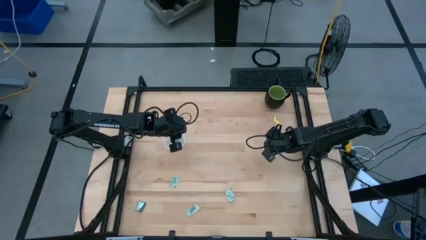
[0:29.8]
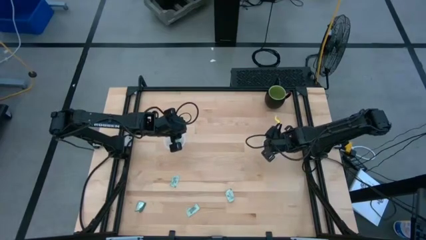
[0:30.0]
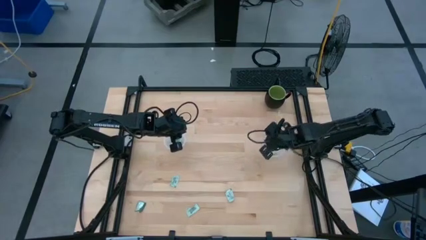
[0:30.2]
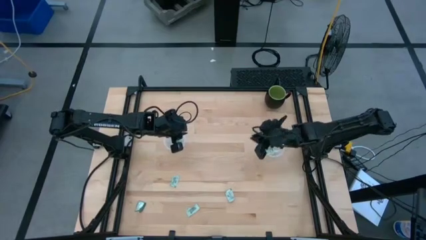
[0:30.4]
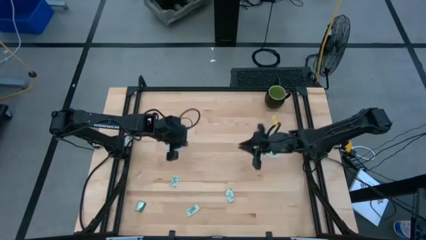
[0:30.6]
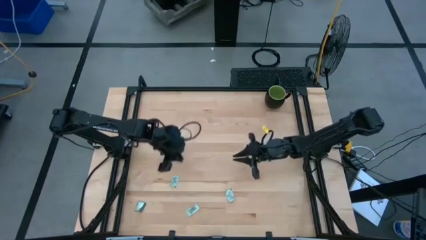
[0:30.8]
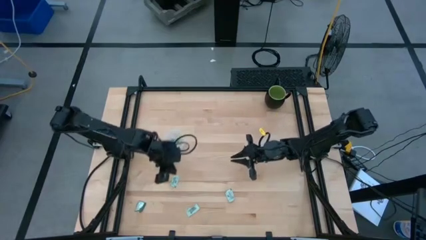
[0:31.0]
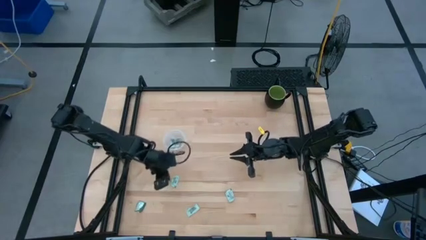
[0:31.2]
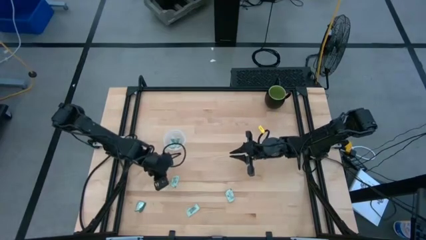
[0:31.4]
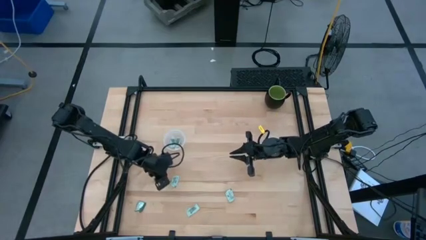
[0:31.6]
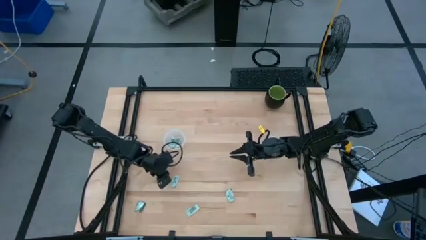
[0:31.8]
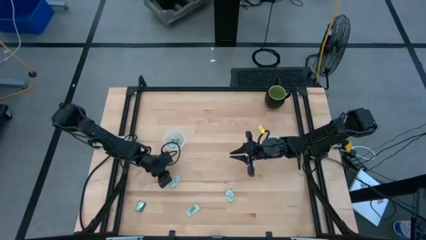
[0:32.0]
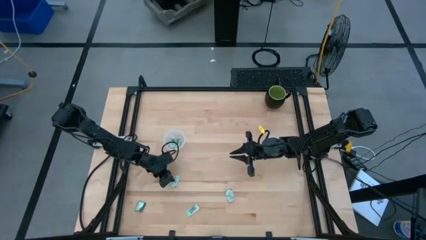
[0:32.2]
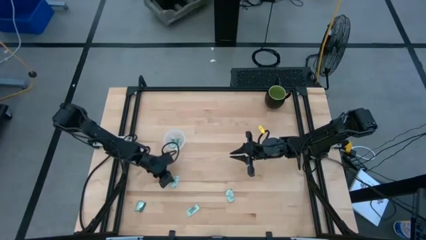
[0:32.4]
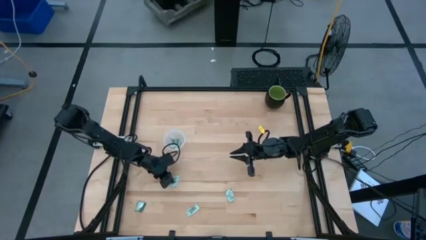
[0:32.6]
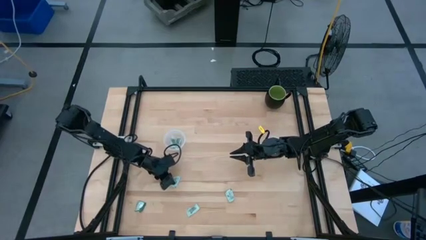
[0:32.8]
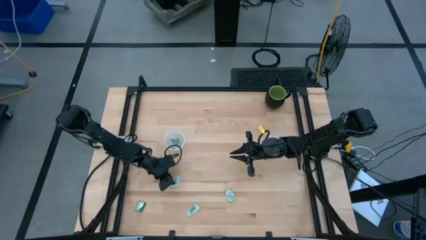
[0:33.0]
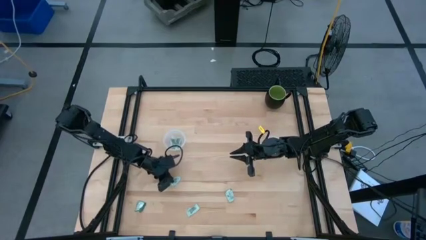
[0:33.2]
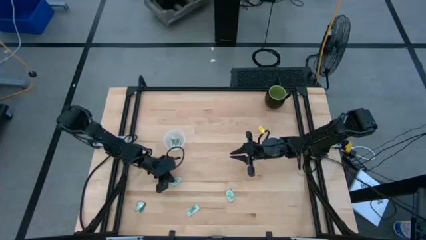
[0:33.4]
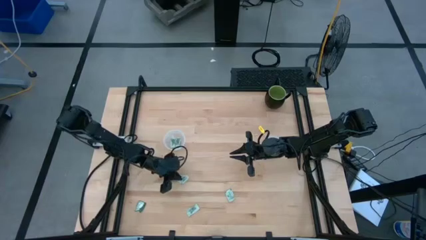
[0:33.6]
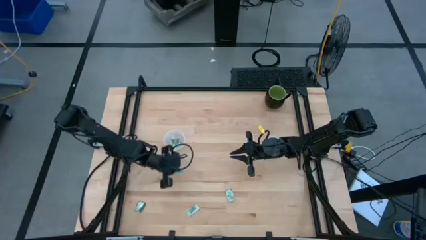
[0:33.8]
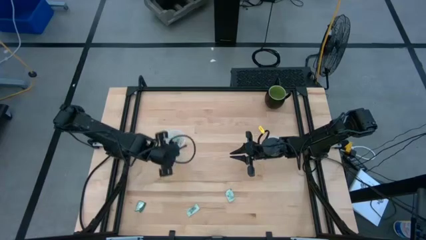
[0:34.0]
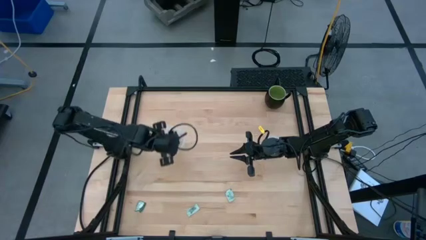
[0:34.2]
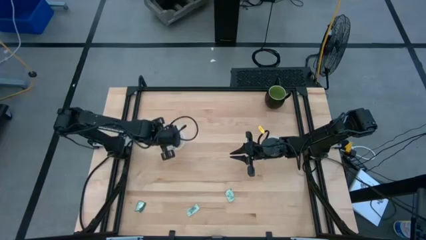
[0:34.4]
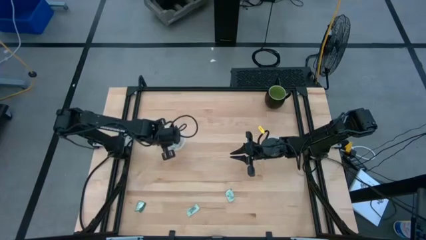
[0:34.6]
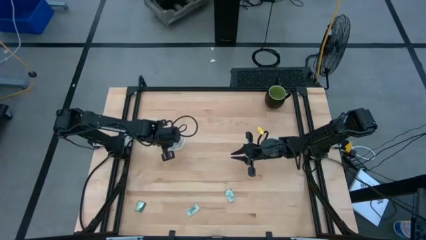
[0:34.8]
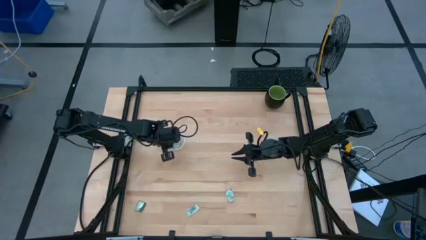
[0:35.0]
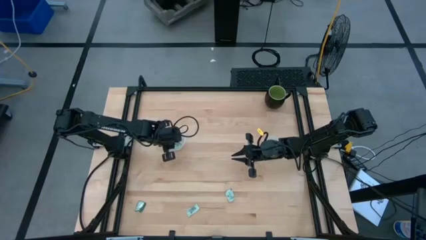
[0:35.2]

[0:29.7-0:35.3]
Task: Pick and place items into bin
Put the stevia packet into the left transparent bin

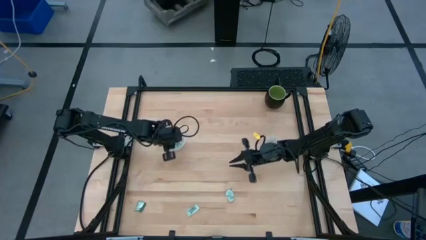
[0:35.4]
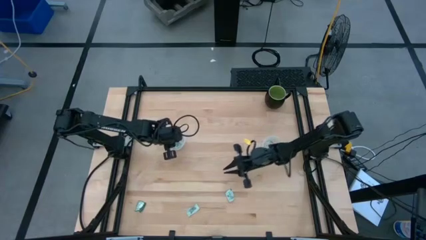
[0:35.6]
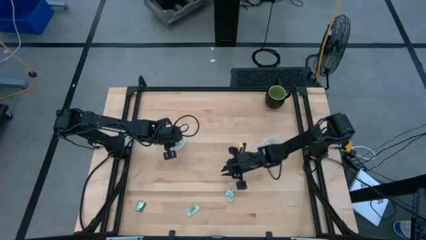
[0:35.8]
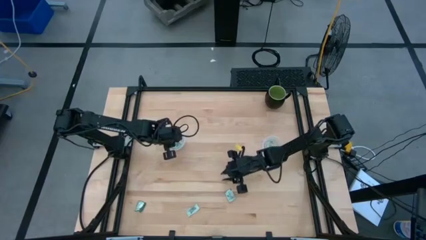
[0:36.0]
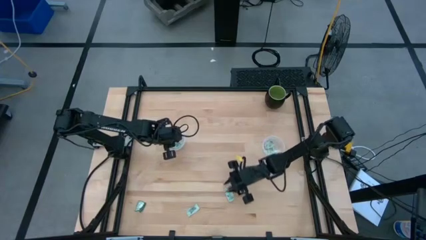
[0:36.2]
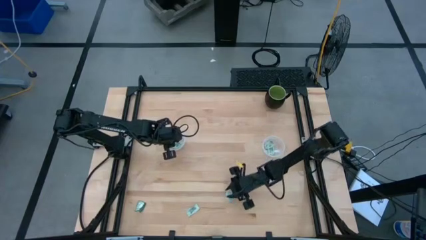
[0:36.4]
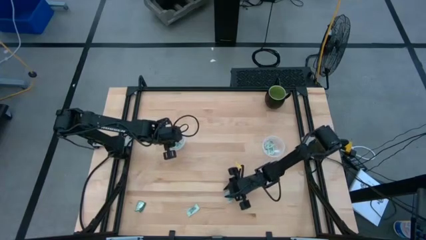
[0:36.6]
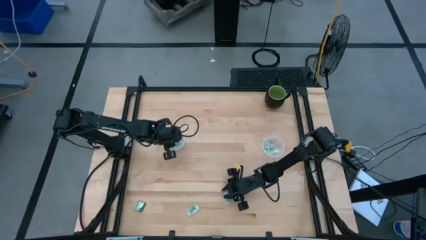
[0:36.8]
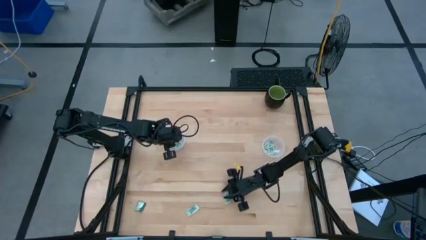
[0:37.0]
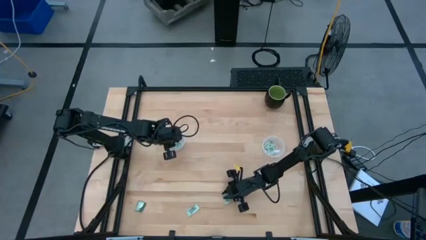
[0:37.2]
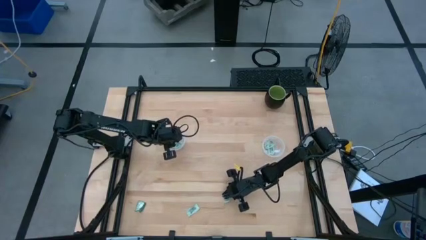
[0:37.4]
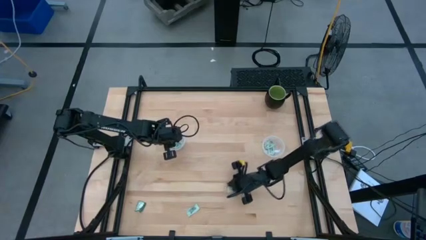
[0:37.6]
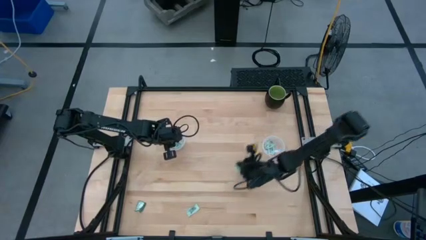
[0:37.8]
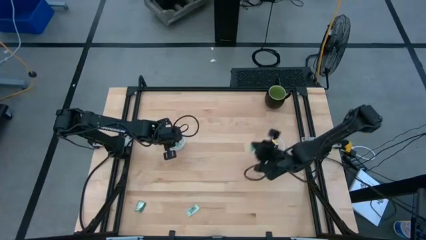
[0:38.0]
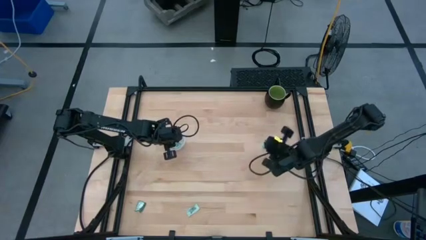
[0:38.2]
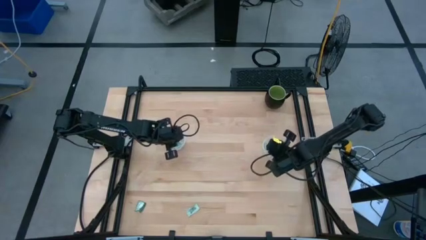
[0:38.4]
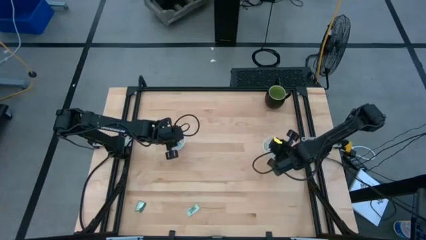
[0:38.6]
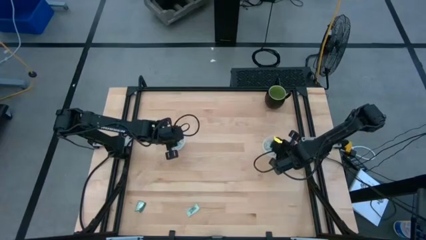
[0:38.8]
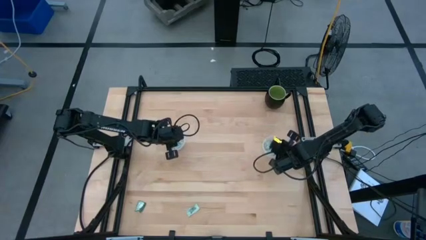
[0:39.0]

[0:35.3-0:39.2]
Put the stevia packet into the right transparent bin

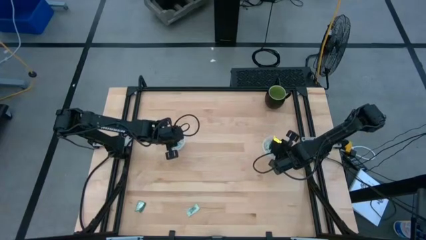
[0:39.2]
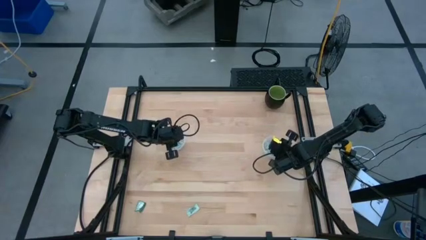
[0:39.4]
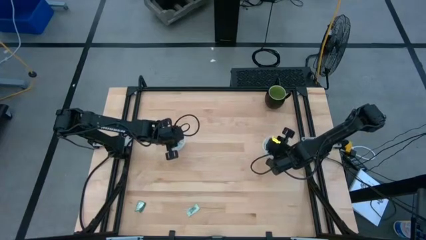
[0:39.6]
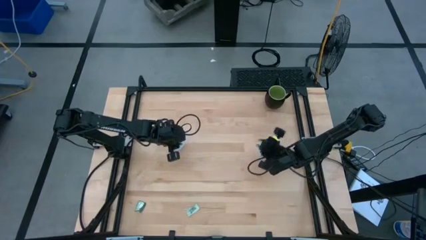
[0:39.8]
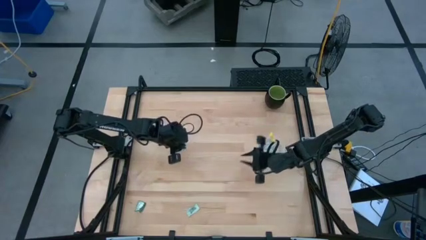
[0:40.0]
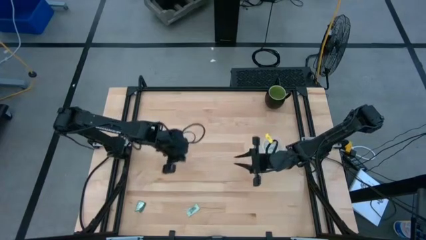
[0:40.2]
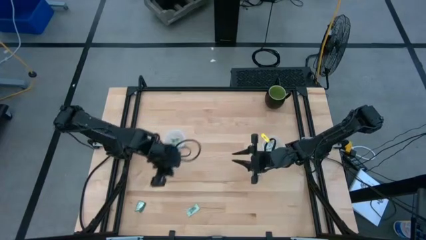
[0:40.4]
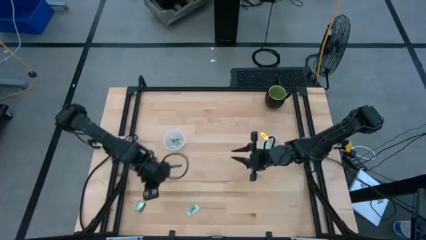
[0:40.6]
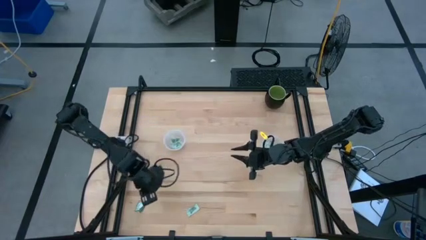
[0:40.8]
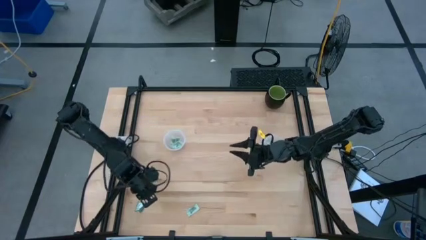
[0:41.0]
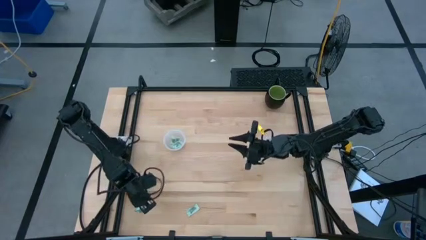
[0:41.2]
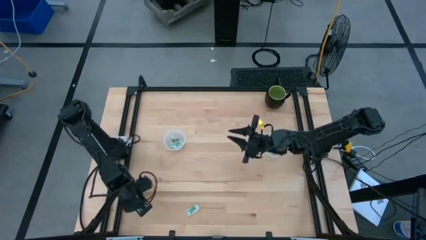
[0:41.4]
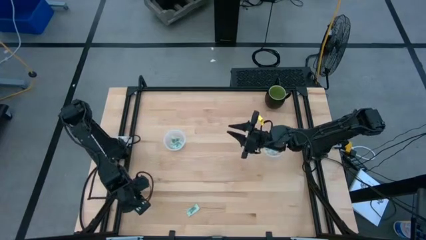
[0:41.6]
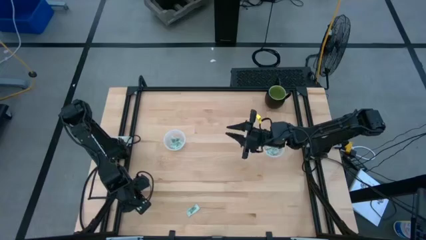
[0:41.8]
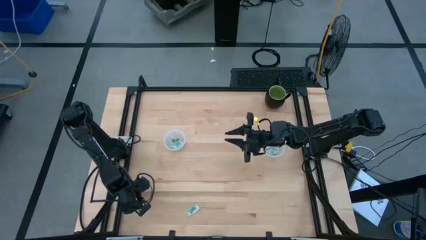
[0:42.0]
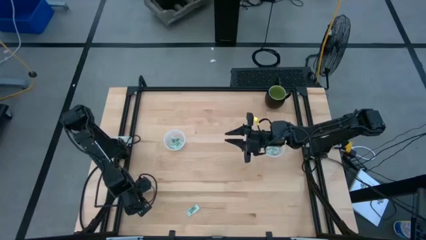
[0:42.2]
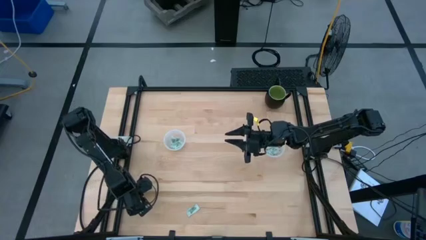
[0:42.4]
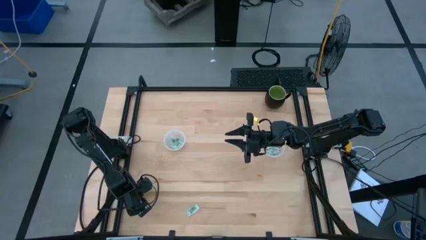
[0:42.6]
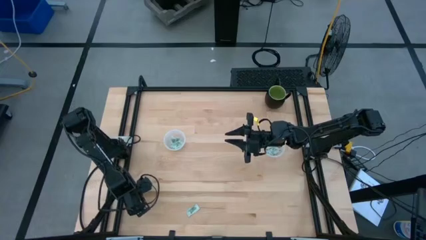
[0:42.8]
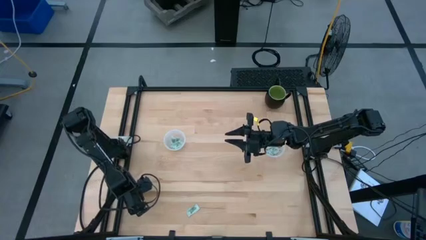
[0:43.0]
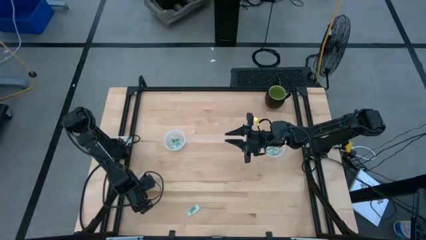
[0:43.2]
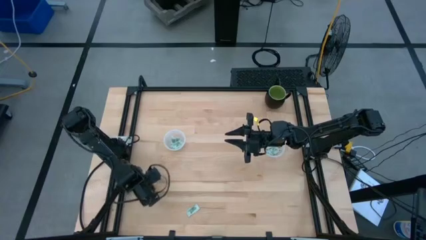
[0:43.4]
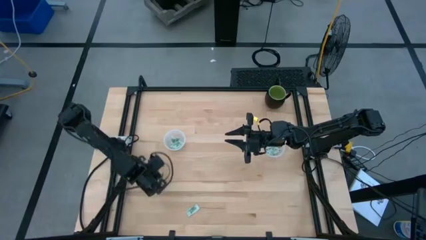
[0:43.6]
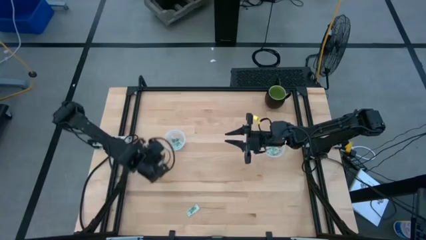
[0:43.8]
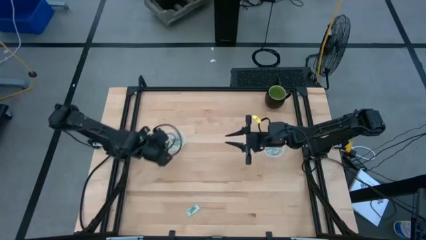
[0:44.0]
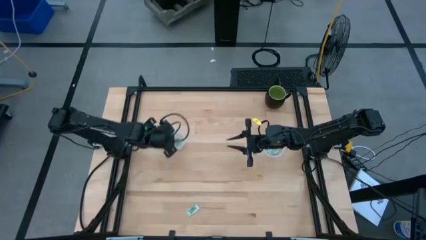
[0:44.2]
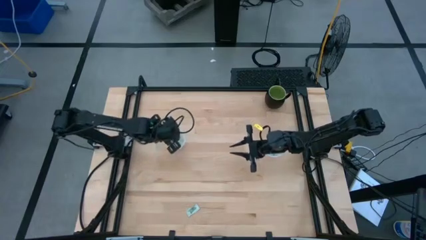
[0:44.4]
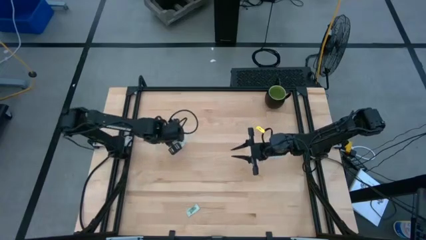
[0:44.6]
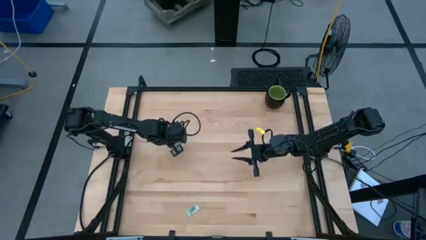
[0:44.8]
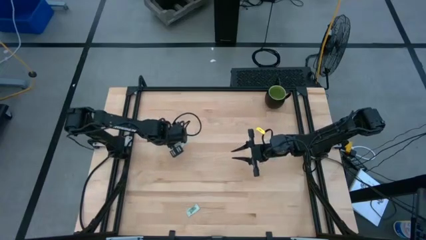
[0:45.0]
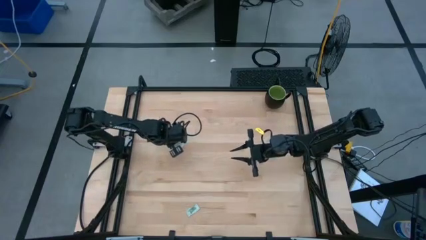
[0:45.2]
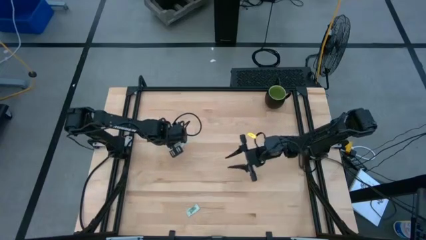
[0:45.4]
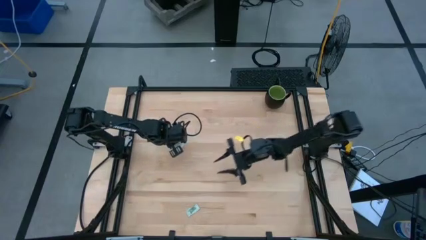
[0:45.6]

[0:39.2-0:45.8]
Put the stevia packet into the left transparent bin

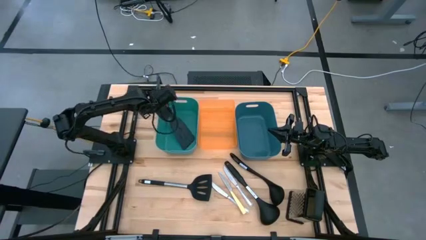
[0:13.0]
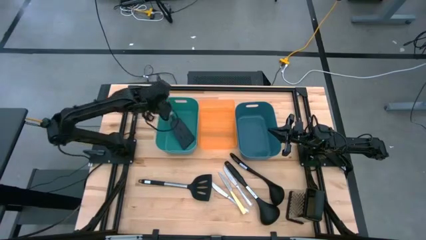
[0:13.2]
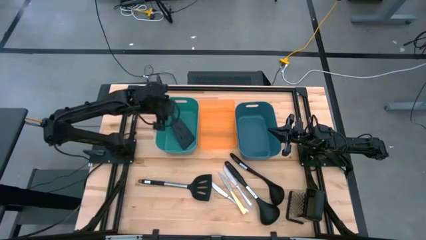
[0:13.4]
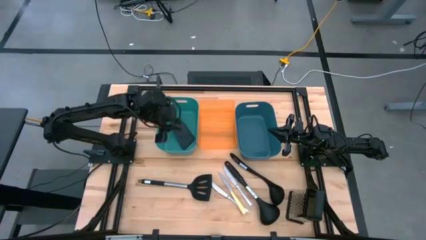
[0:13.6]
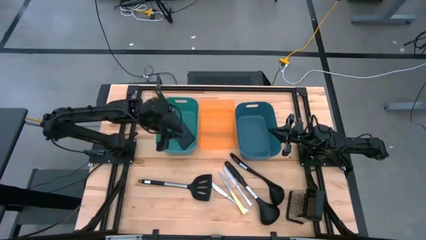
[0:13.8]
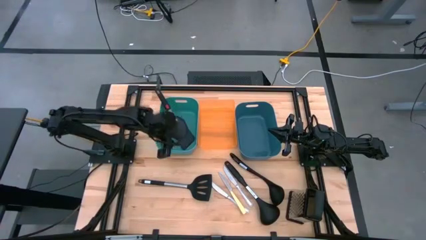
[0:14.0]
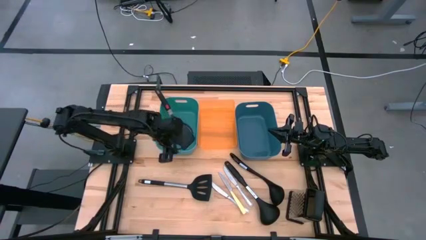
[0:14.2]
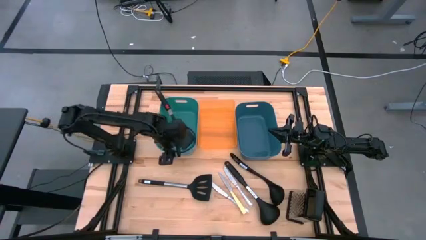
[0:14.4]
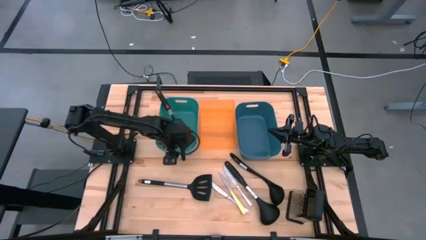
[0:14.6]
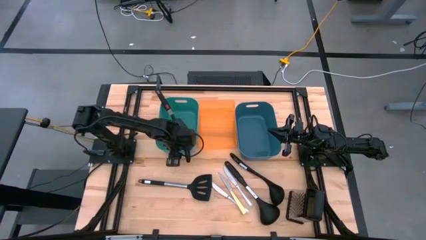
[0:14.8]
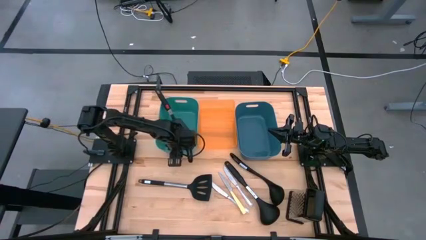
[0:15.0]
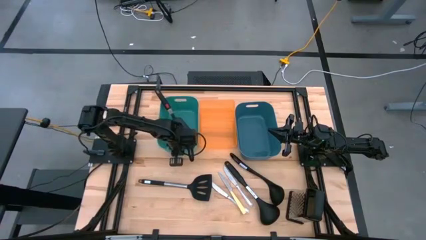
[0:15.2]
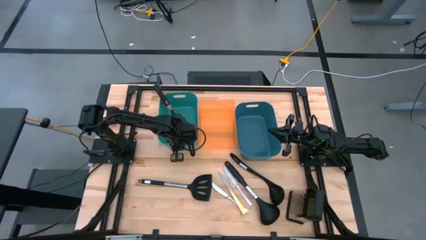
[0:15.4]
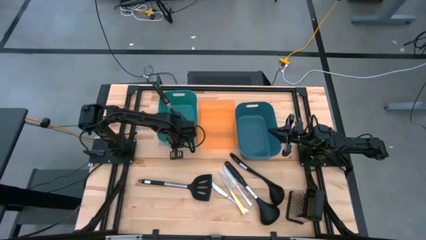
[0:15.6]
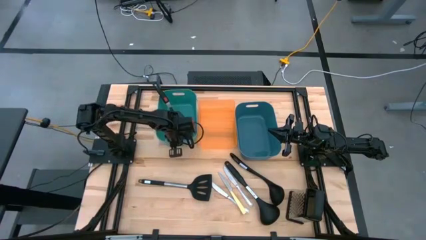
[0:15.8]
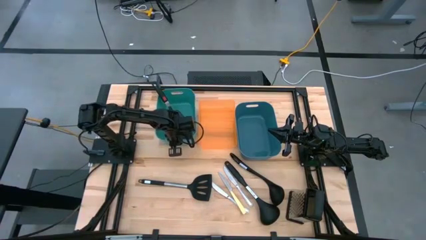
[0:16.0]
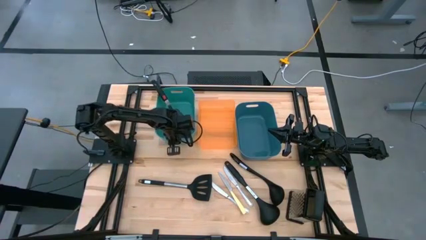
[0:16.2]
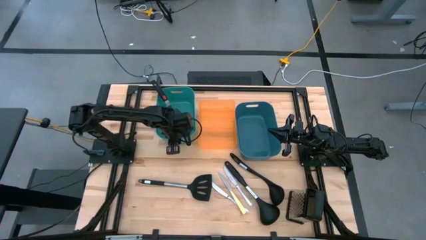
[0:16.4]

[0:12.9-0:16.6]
Task: Pick & Place Kitchen Items
Adjust the light green bin
